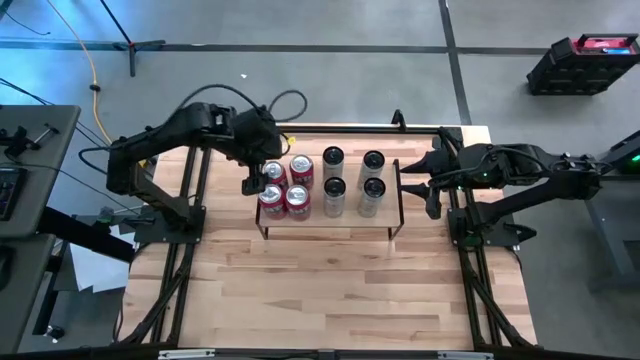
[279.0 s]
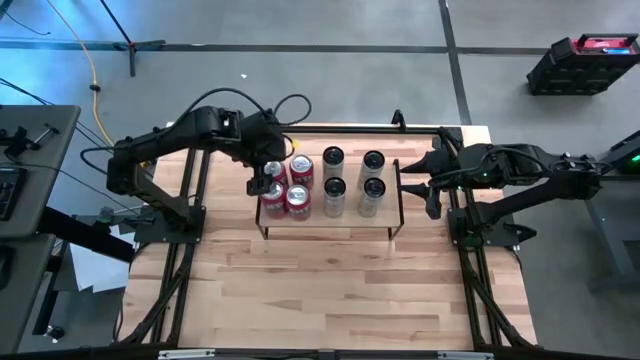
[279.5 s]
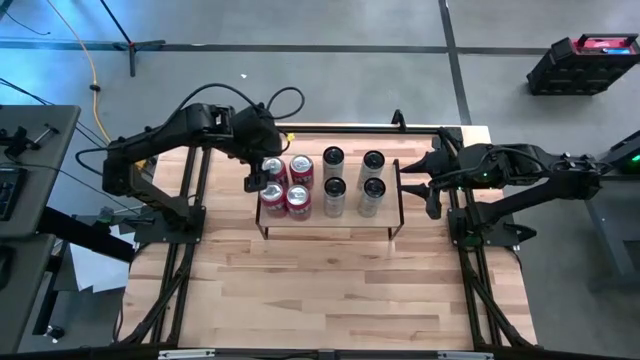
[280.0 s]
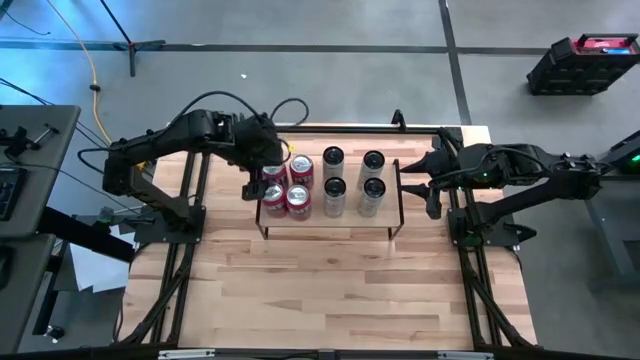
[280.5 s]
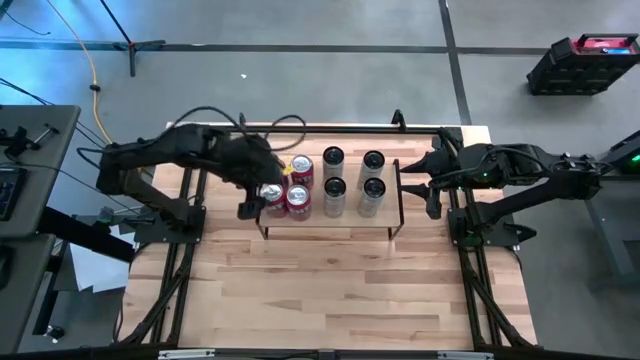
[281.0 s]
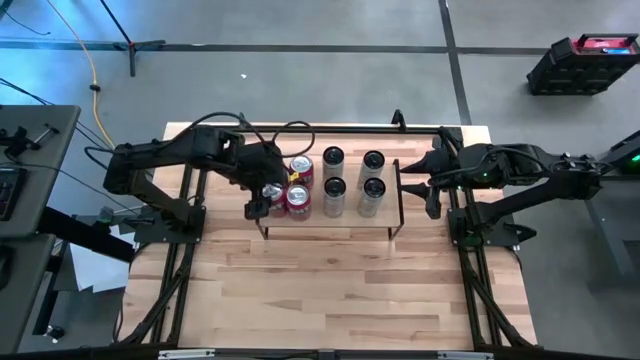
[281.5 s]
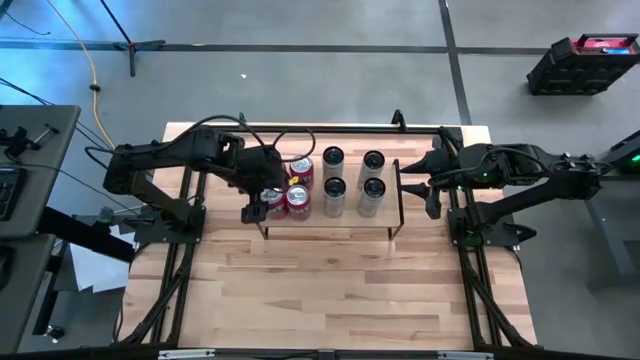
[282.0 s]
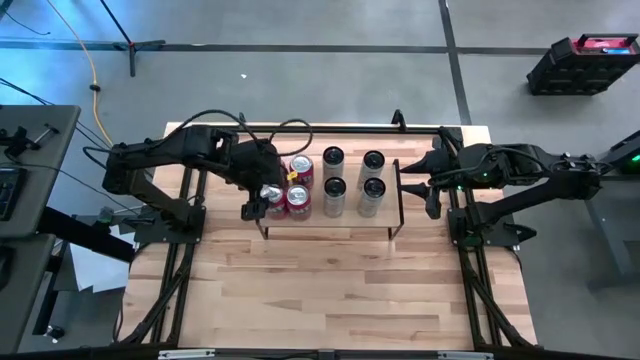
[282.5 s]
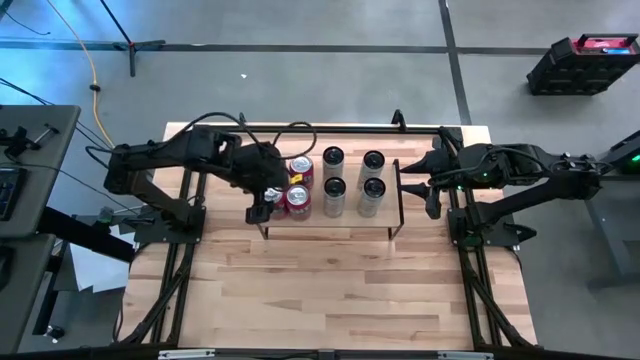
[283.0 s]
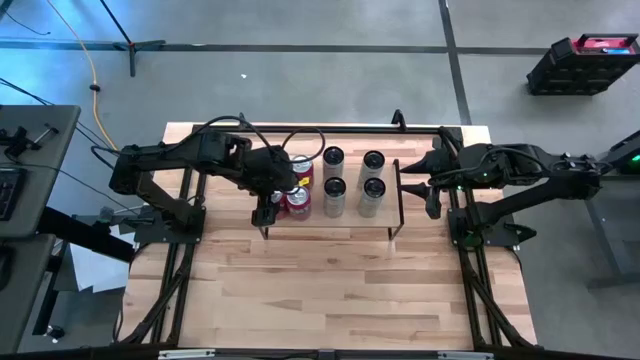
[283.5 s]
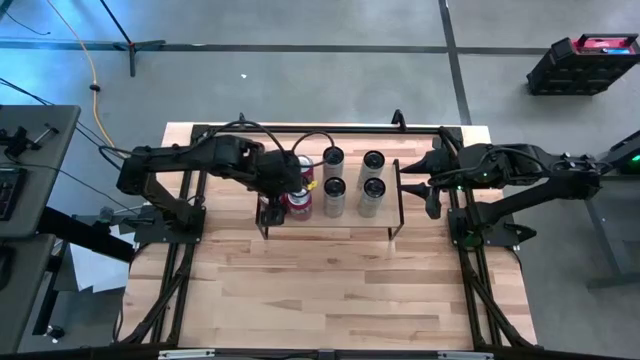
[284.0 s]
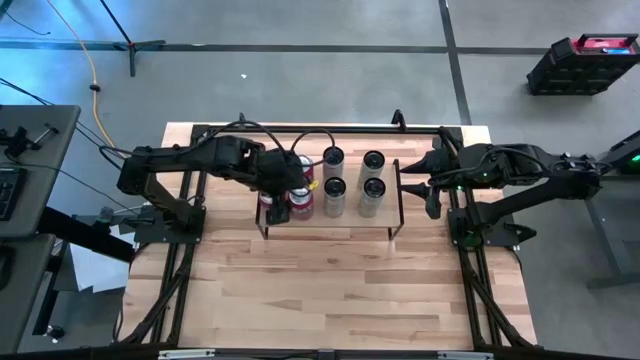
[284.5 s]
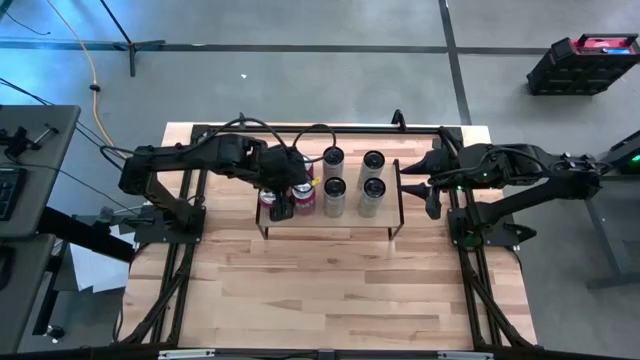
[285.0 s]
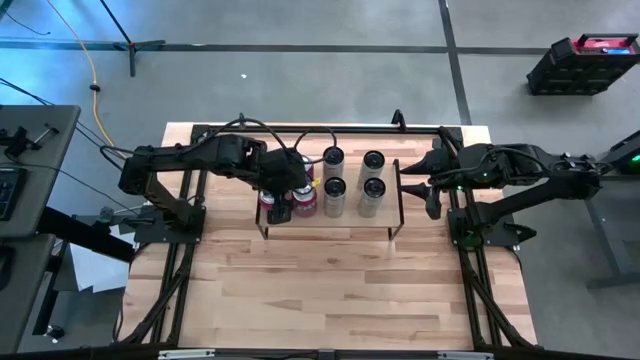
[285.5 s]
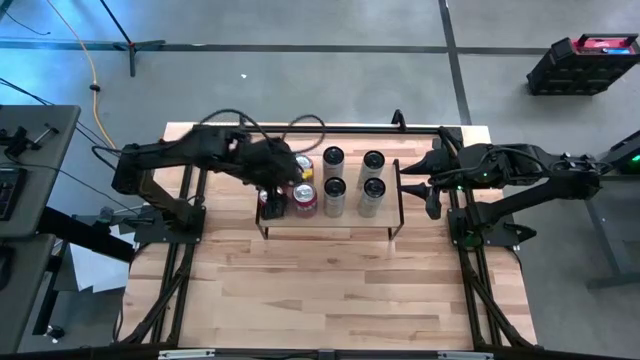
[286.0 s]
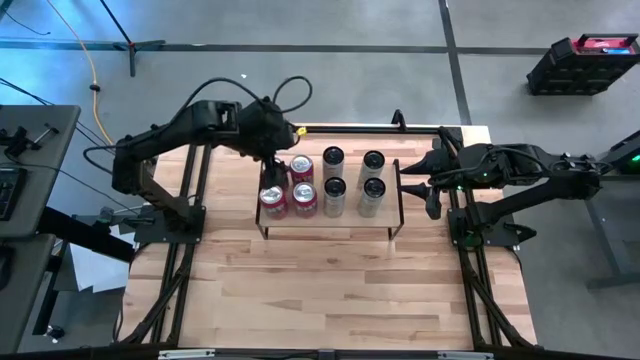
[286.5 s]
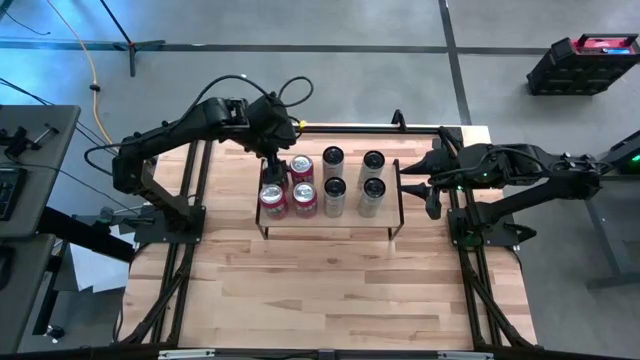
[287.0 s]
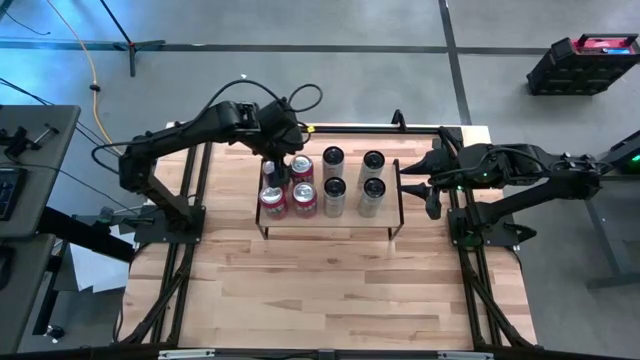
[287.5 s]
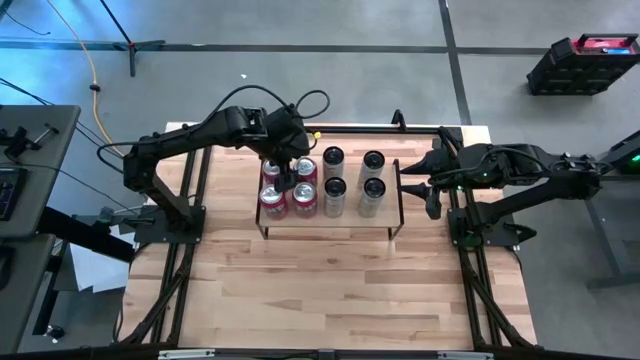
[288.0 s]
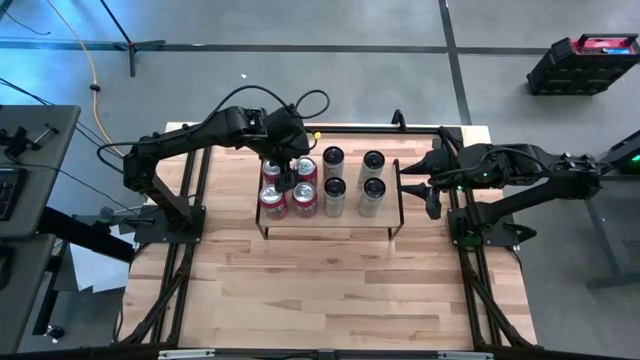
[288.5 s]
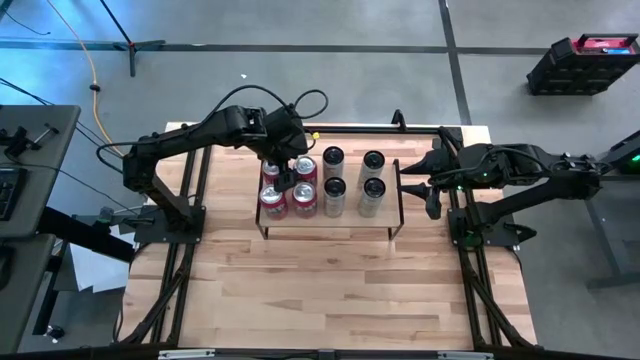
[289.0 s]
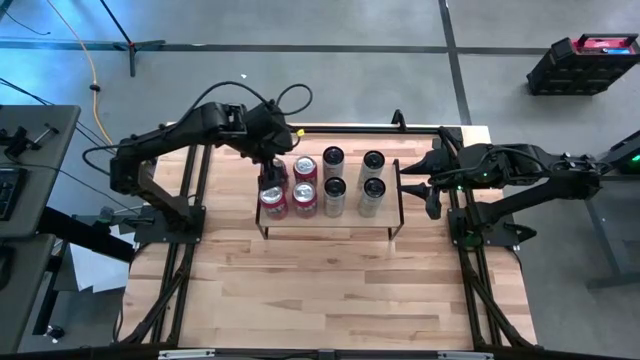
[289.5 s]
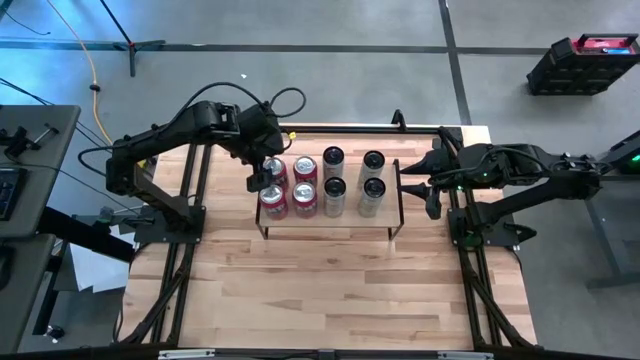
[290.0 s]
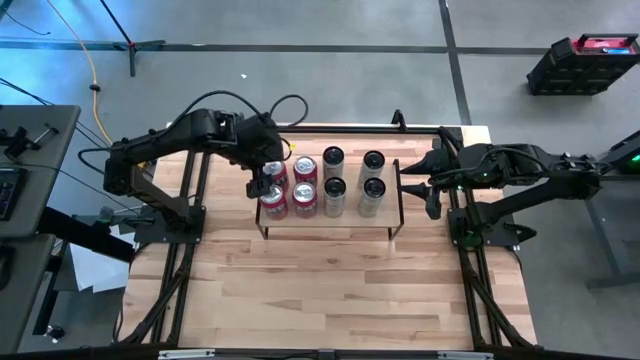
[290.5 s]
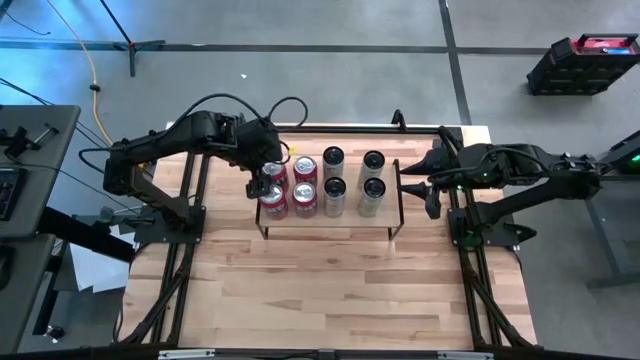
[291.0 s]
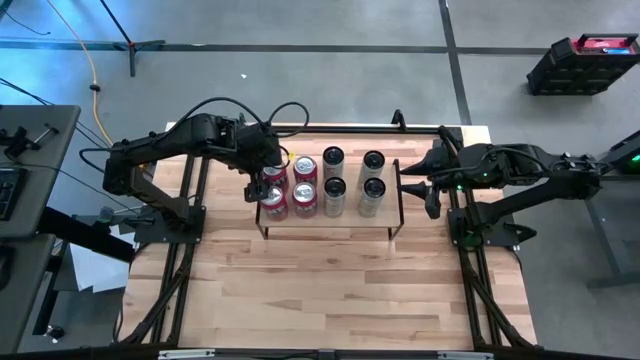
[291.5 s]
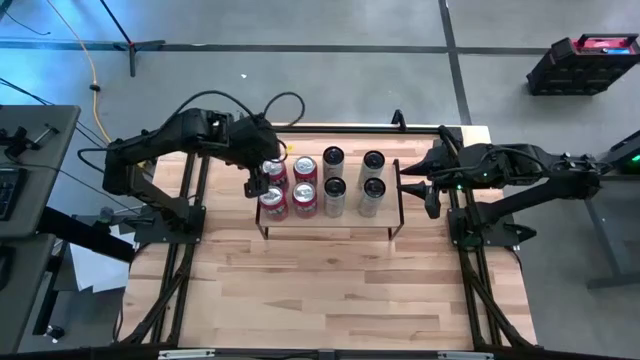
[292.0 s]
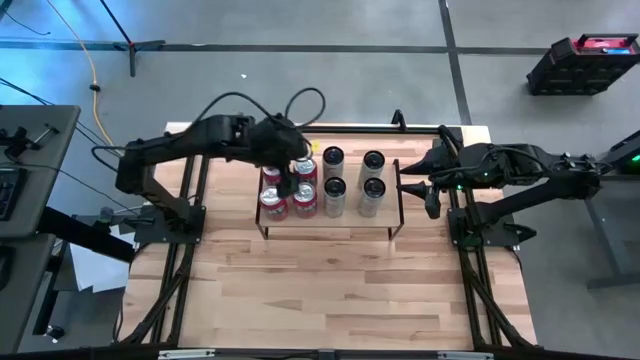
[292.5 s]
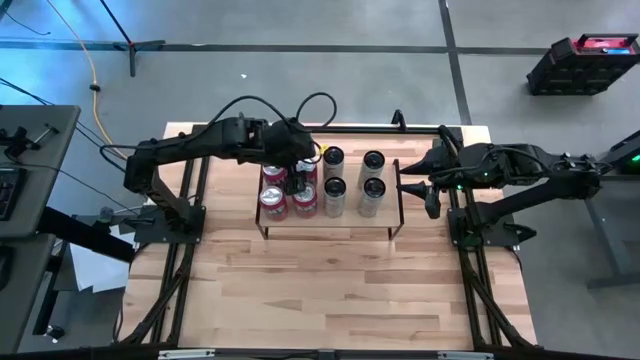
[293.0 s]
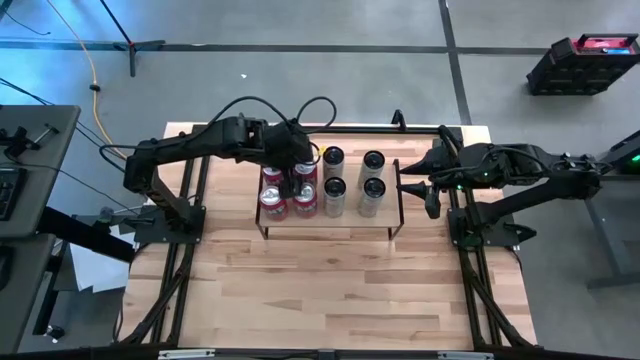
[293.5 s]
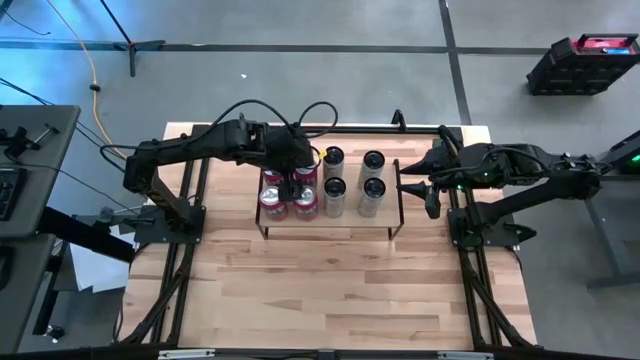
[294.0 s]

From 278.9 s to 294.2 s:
Task: Place canned beverage on shelf
Adjust the soda cans on the shelf

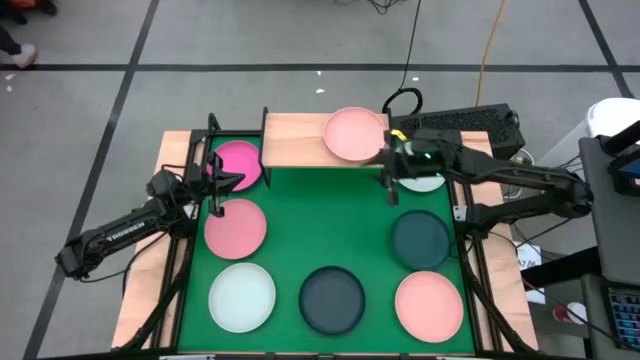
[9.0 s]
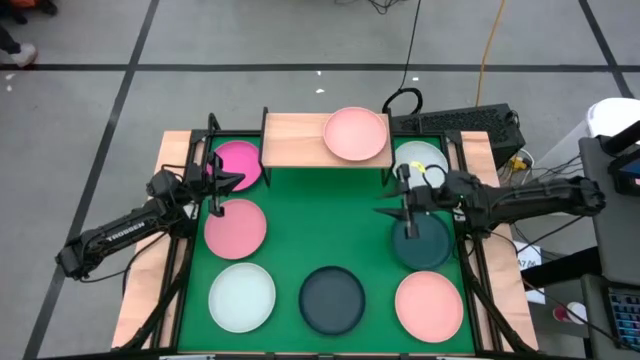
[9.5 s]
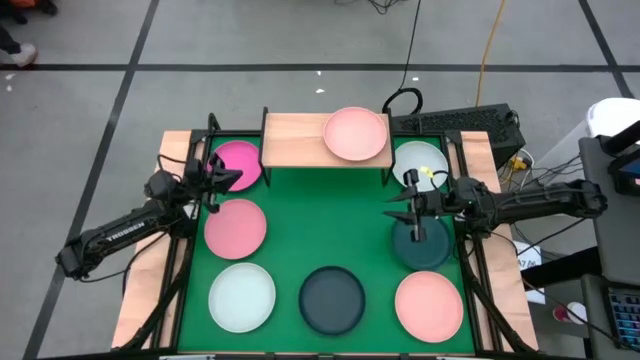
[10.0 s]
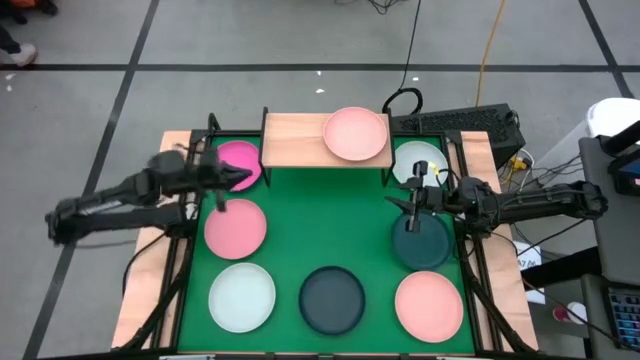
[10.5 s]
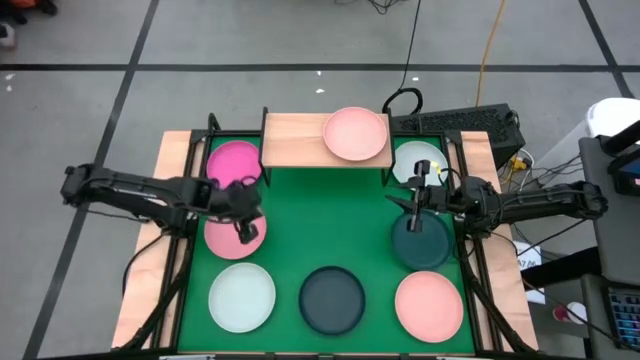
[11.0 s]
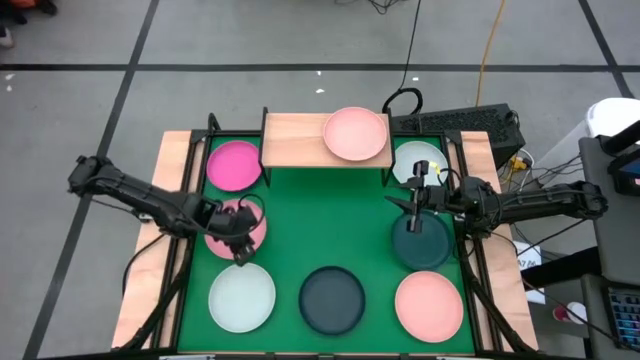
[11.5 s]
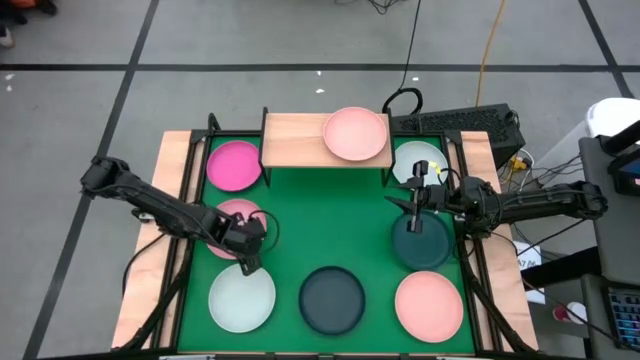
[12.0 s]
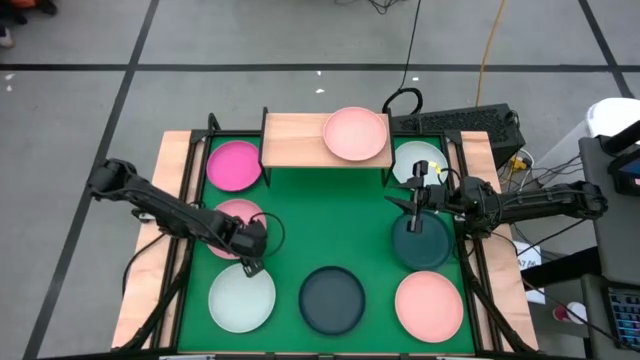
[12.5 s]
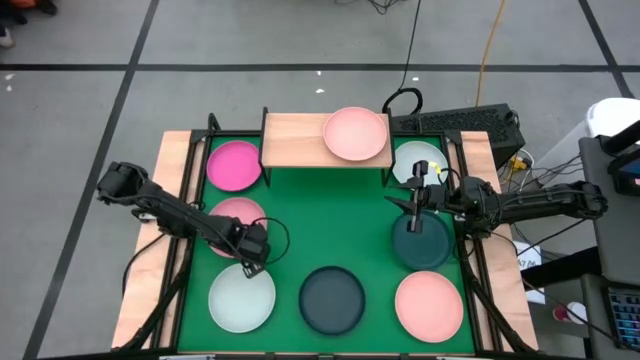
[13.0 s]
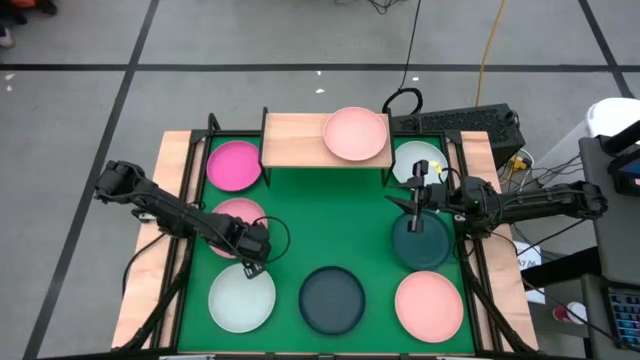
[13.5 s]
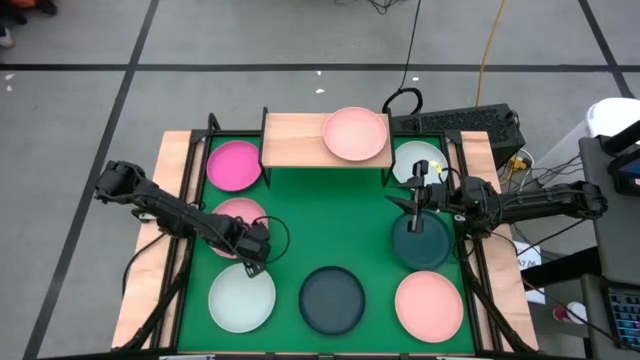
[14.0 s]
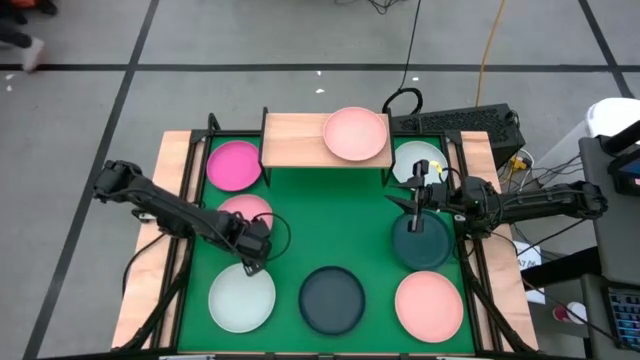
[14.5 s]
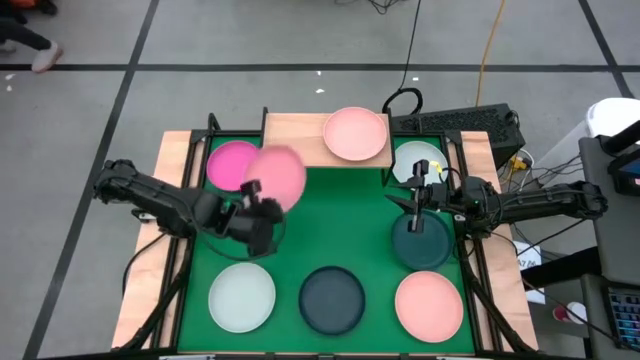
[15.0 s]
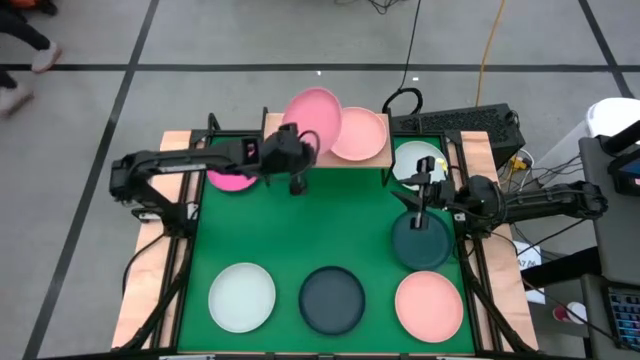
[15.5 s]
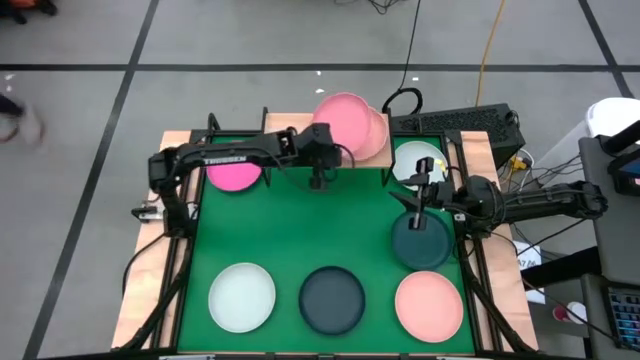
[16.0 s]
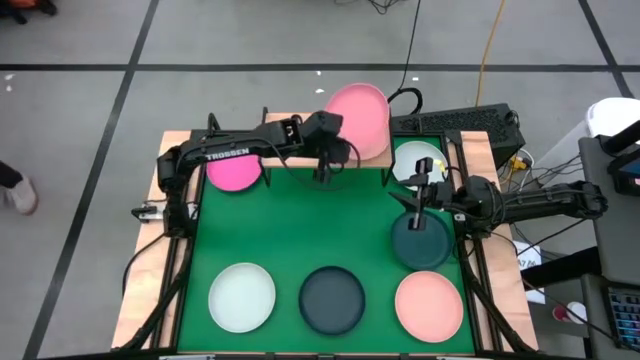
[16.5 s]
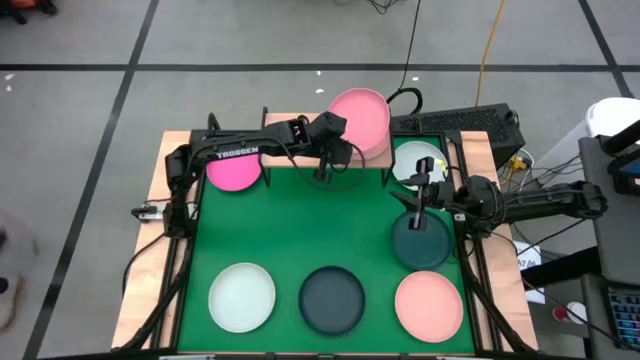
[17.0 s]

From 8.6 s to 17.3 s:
Task: Place and stack plates onto a shelf
Stack the light pink plate on the light orange plate on the shelf
